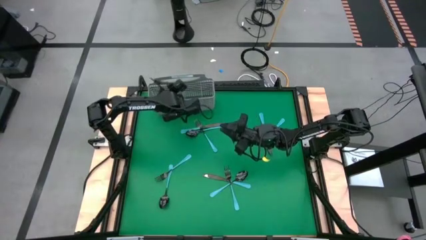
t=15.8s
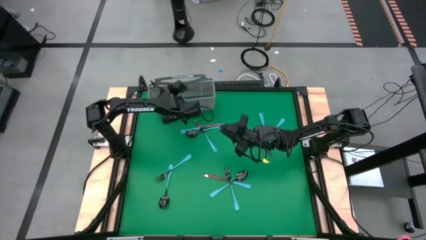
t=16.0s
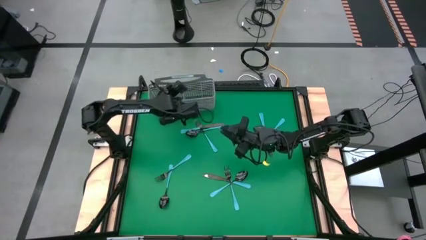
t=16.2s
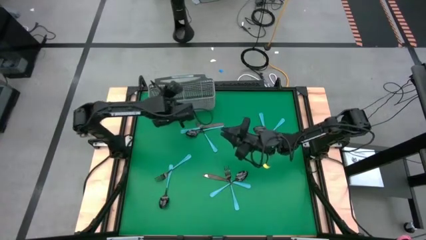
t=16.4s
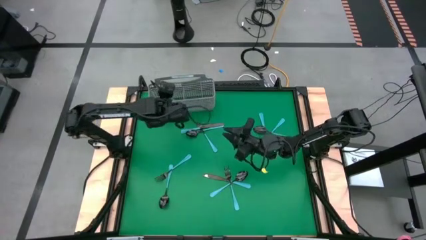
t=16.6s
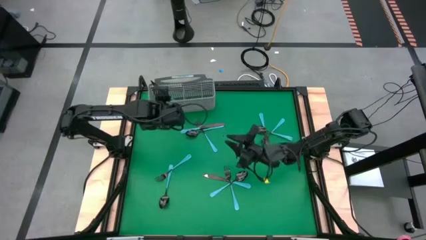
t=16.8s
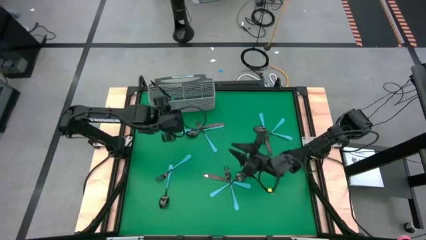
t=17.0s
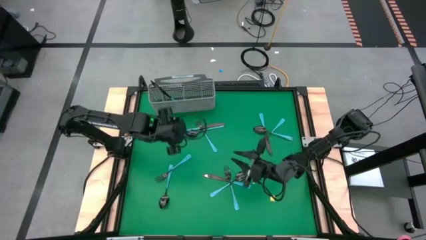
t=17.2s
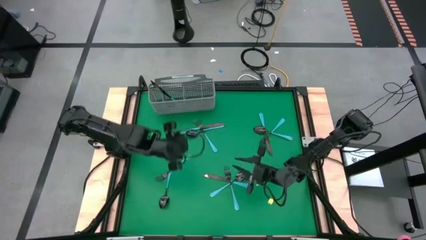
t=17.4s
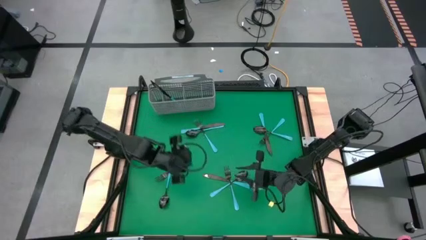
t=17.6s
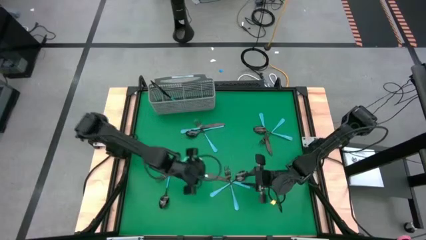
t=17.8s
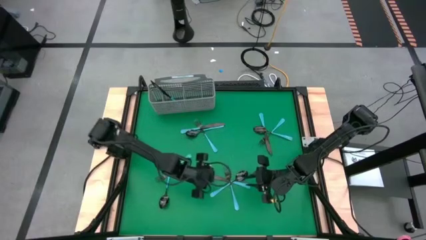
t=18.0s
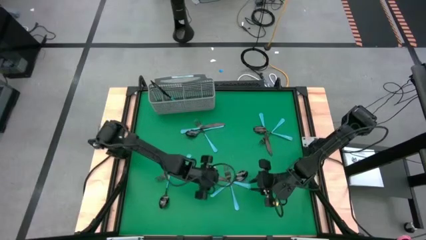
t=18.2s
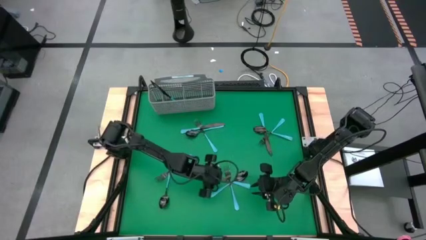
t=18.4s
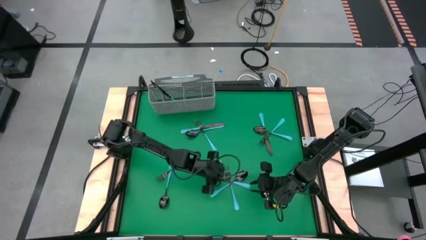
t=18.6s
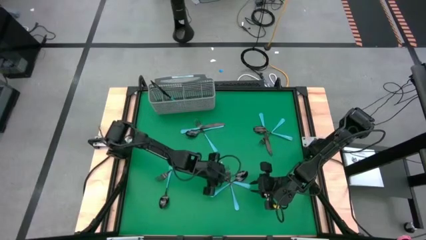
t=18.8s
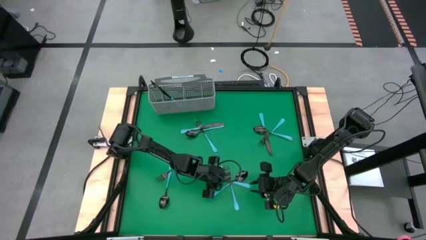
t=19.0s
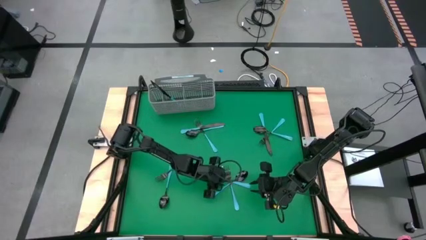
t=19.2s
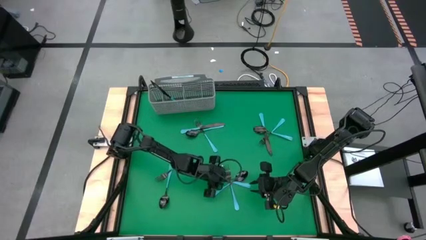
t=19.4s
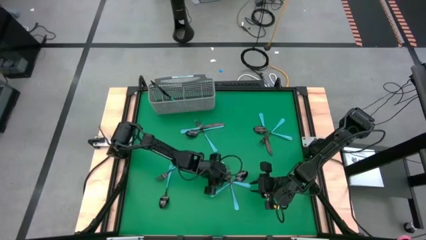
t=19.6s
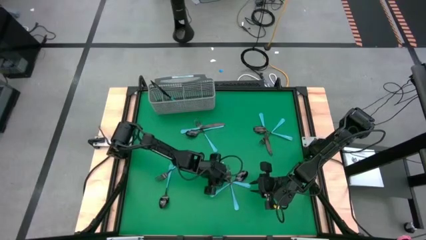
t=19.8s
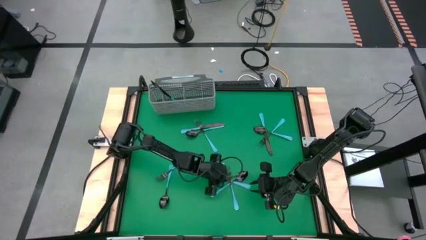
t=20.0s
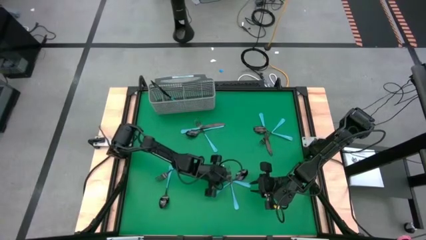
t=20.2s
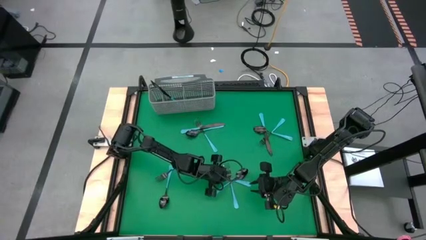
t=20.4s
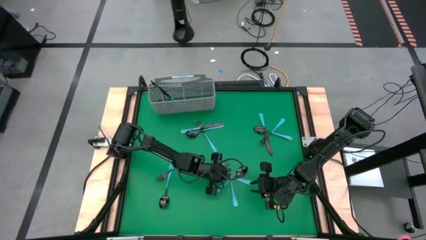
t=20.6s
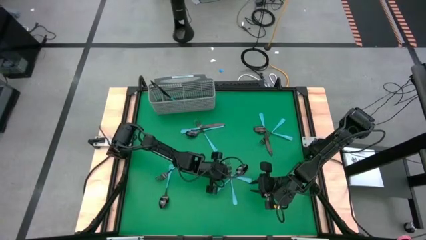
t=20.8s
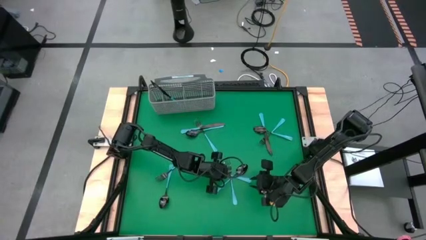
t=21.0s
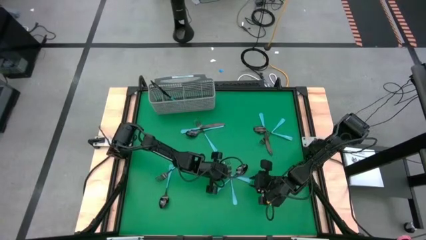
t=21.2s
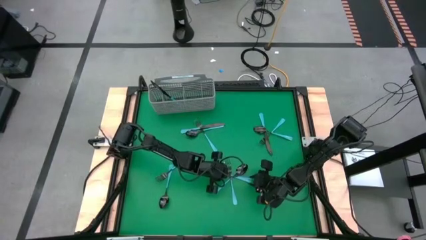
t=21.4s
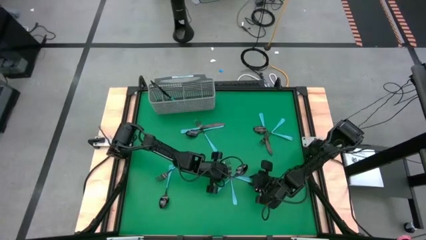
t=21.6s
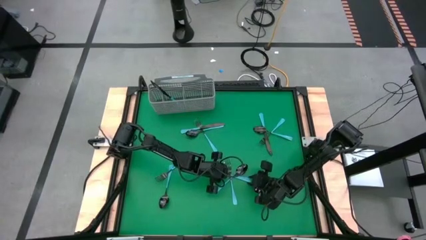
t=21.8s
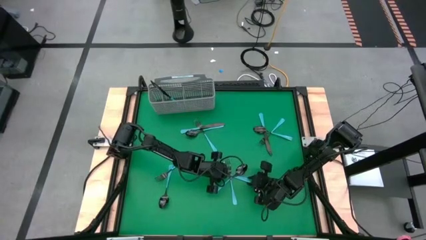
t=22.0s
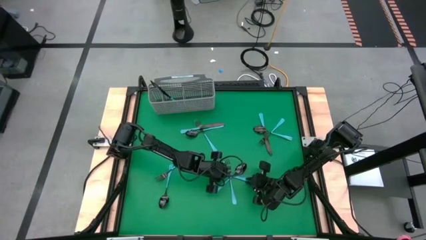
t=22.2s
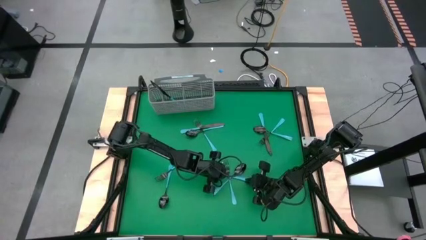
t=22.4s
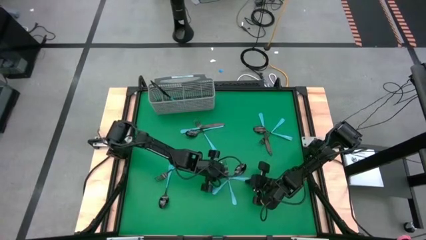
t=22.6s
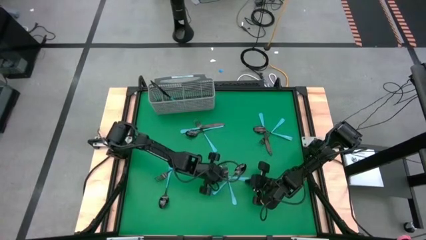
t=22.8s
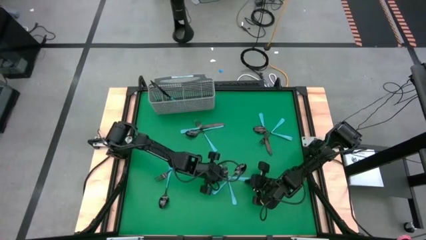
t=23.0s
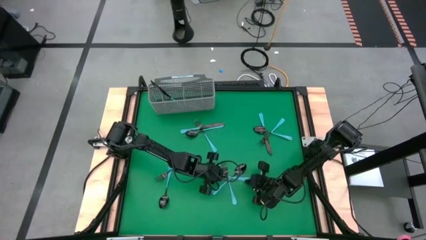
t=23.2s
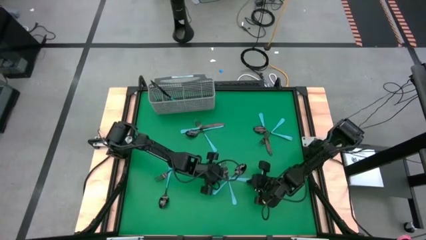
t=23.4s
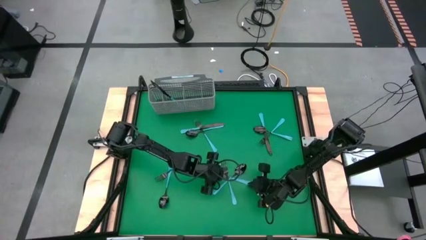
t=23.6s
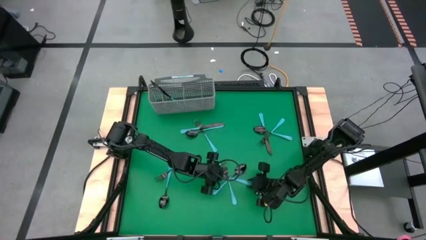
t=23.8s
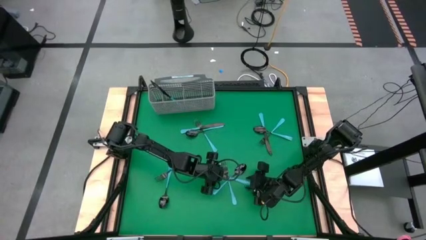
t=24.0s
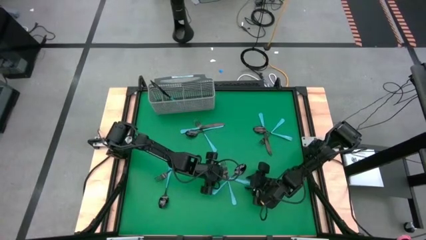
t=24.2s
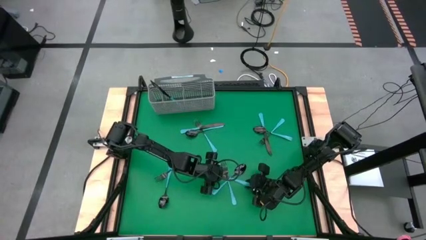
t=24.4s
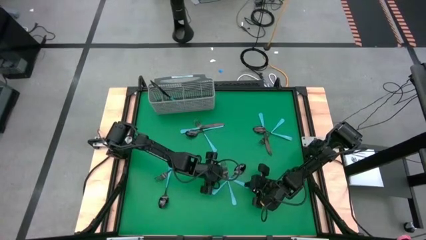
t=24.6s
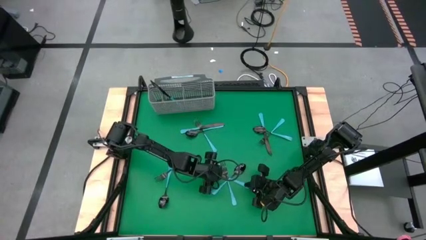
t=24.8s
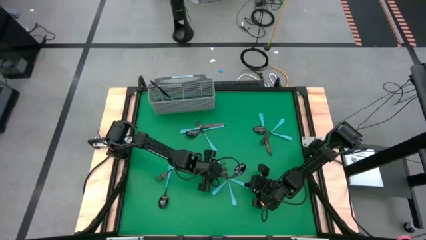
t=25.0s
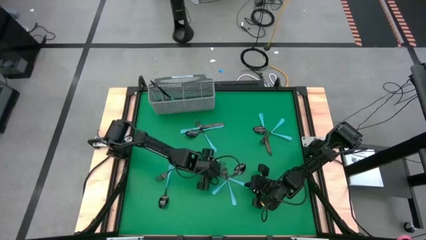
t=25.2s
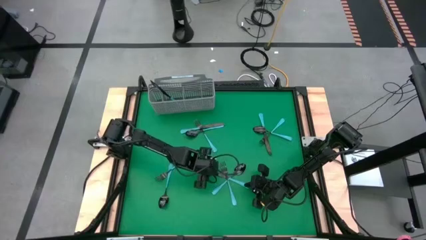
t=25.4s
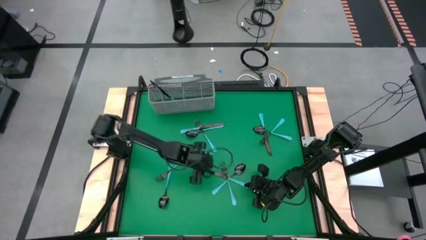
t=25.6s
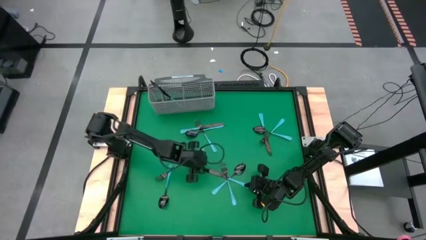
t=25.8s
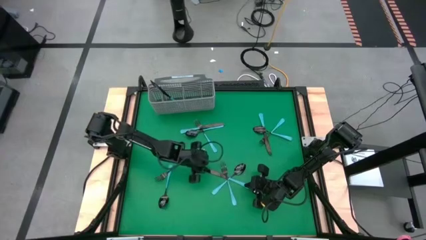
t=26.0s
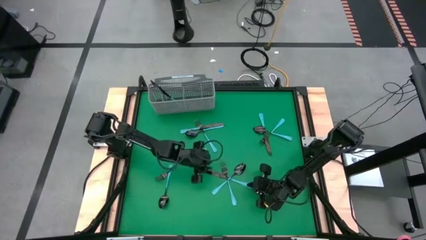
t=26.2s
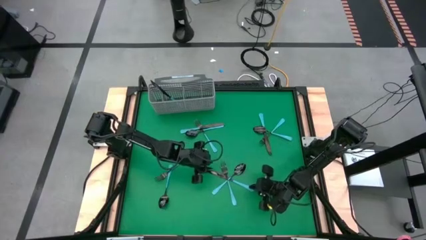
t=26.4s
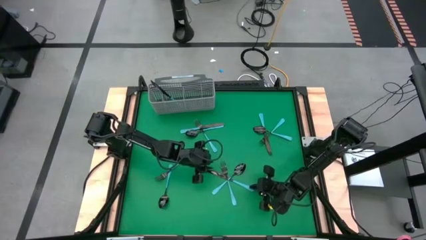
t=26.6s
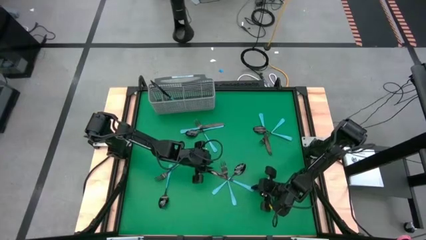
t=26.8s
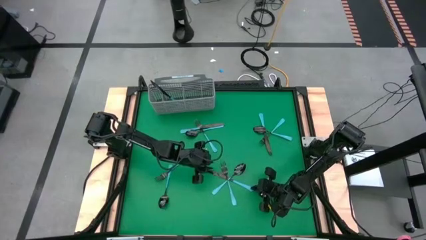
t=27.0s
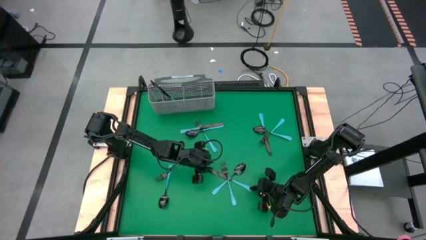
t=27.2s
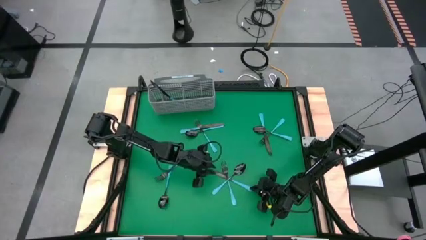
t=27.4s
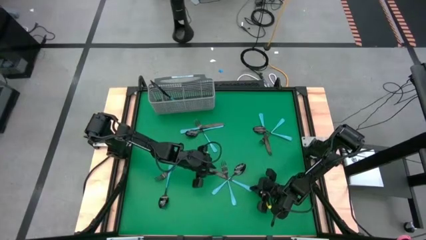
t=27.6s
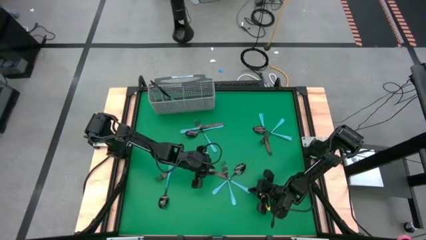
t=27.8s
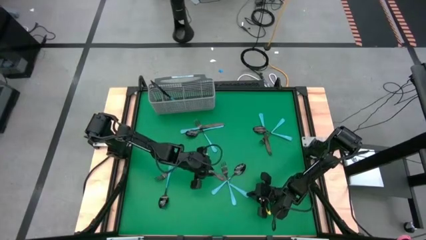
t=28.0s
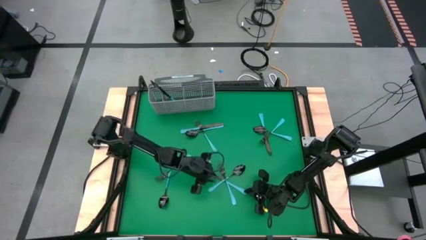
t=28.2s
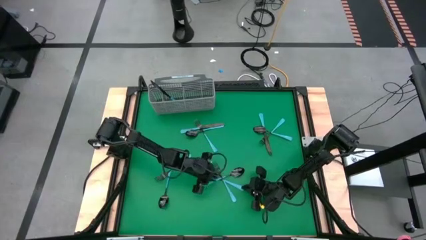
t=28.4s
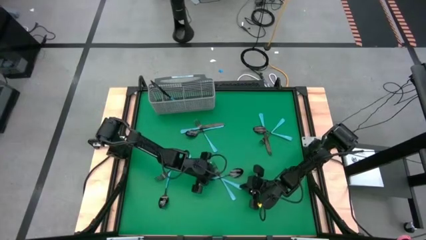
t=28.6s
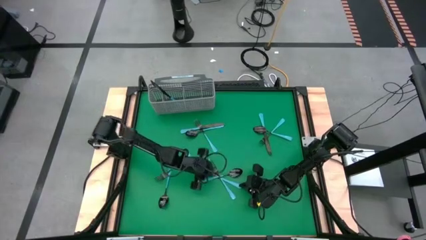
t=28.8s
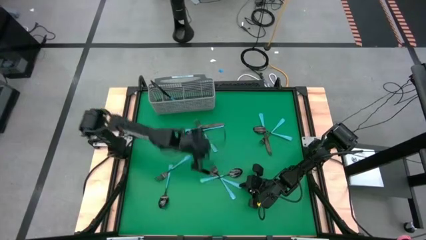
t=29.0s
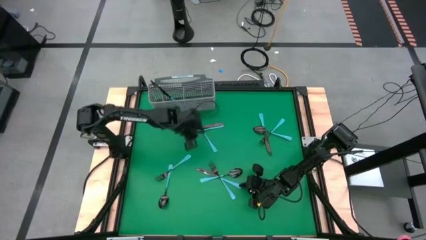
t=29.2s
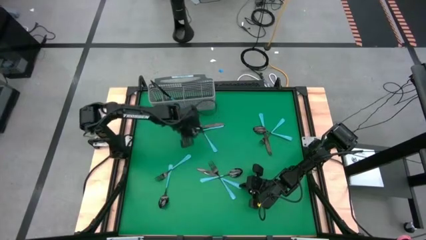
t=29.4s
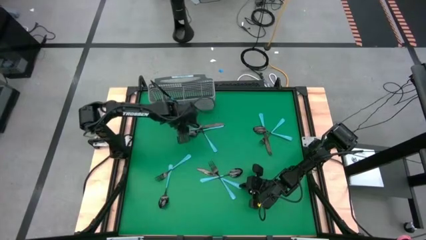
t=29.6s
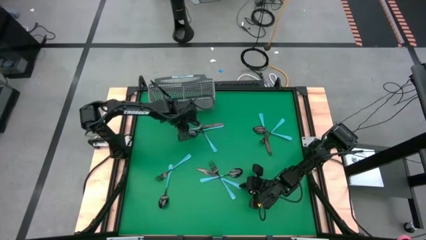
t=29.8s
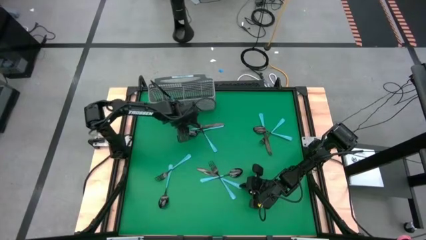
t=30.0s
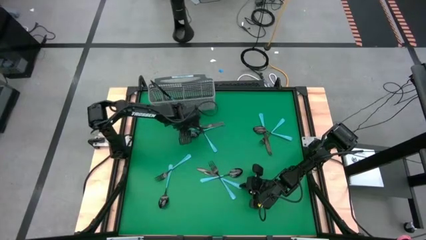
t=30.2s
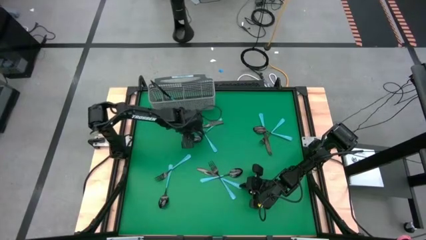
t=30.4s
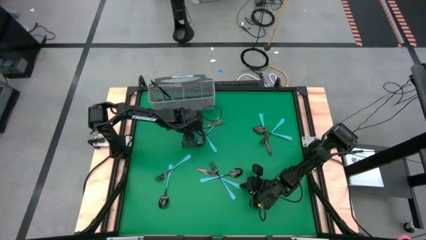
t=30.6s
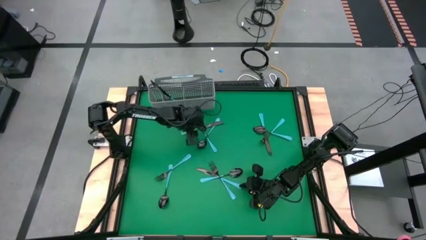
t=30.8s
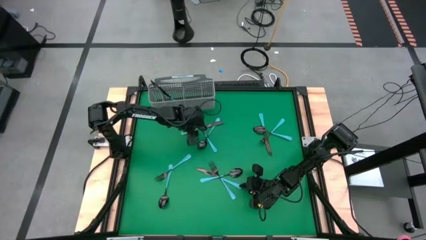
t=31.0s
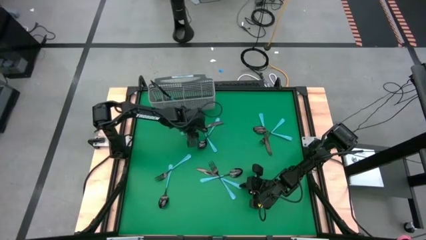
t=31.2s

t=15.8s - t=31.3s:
Task: Sort silverware
Put the table knife into the silverware rack

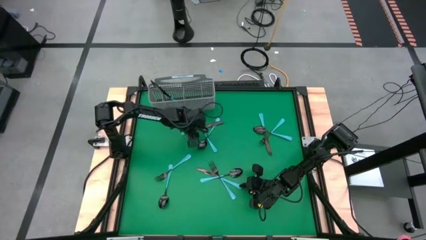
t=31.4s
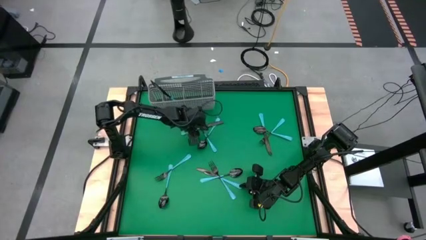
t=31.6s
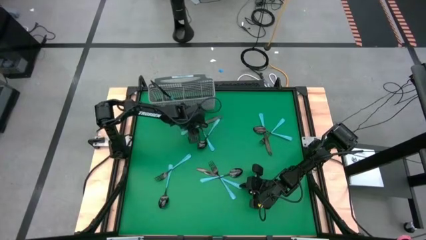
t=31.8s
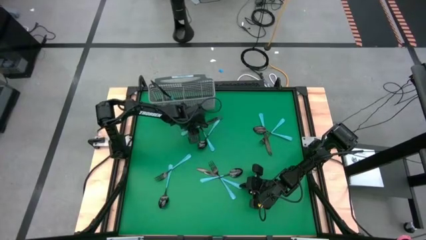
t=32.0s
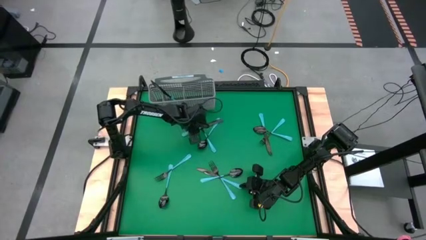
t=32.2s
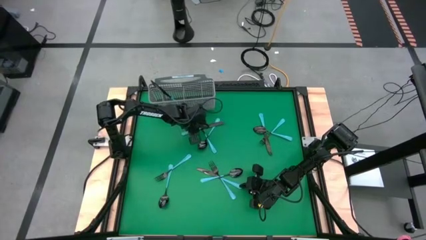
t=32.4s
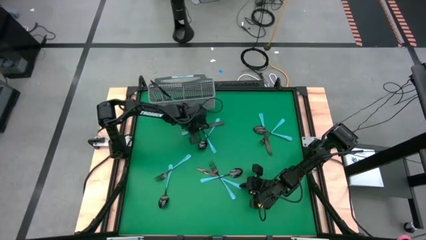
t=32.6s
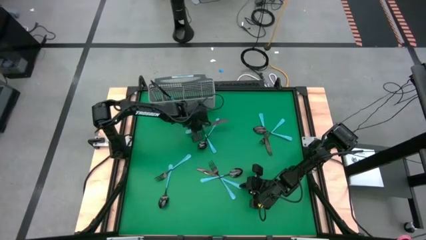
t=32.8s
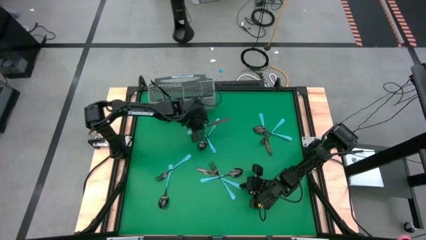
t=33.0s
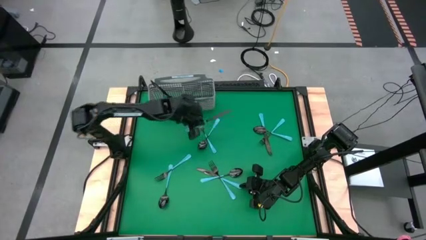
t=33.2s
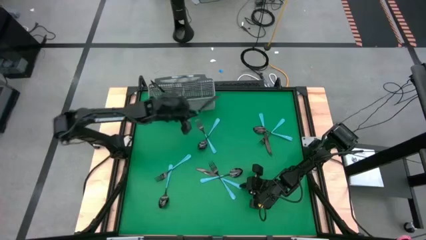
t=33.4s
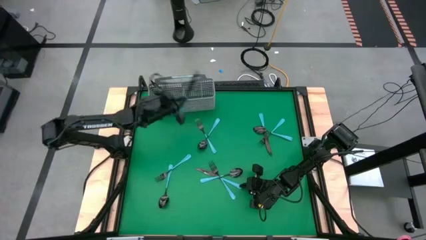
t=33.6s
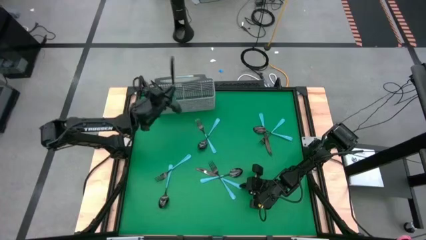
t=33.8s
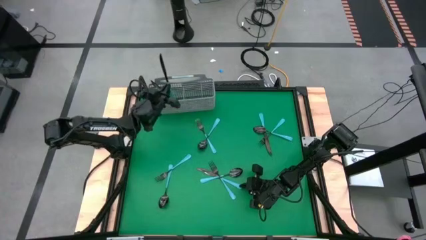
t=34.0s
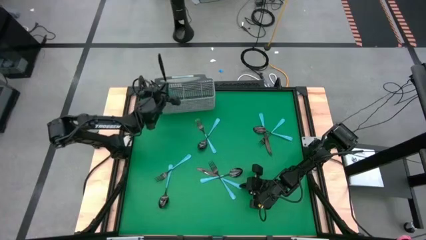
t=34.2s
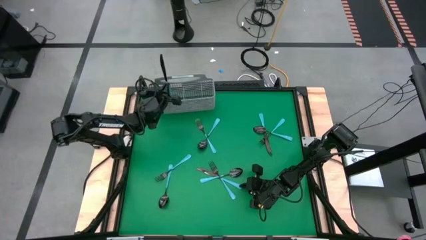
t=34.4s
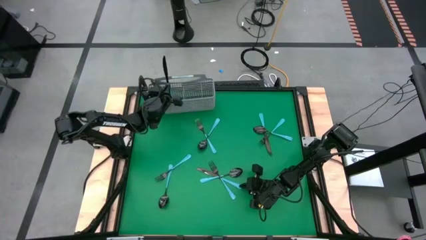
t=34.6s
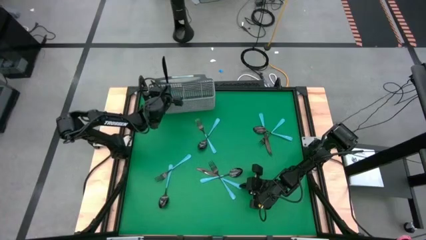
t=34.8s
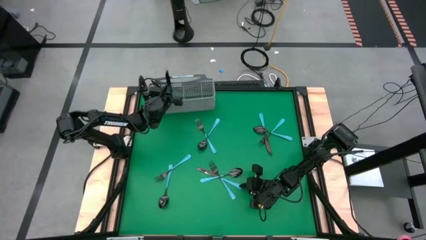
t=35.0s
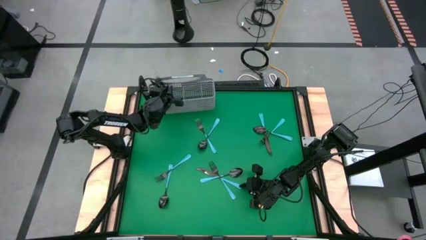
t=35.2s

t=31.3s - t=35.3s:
Put the table knife into the silverware rack
